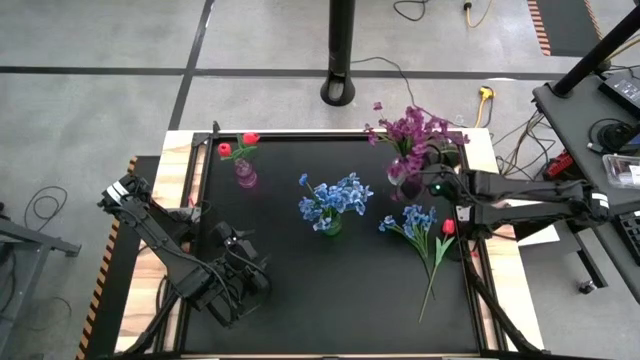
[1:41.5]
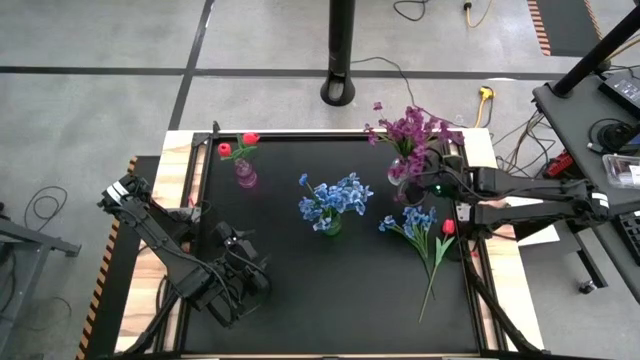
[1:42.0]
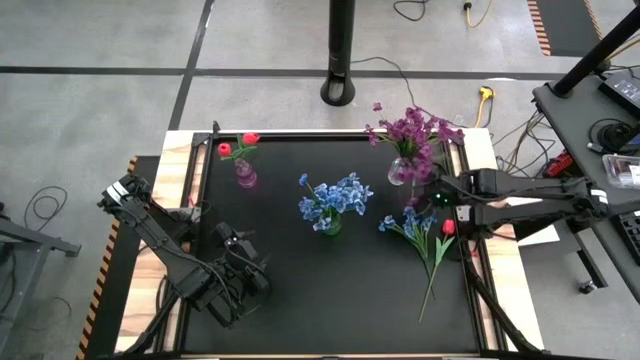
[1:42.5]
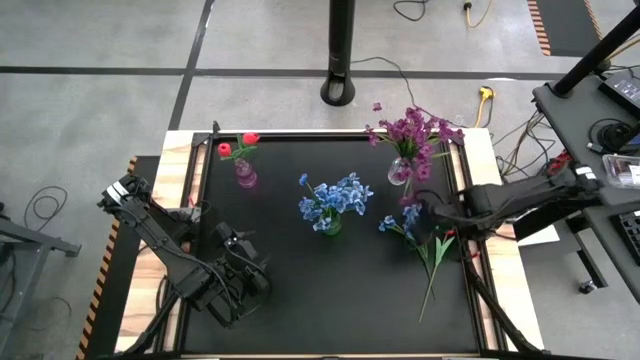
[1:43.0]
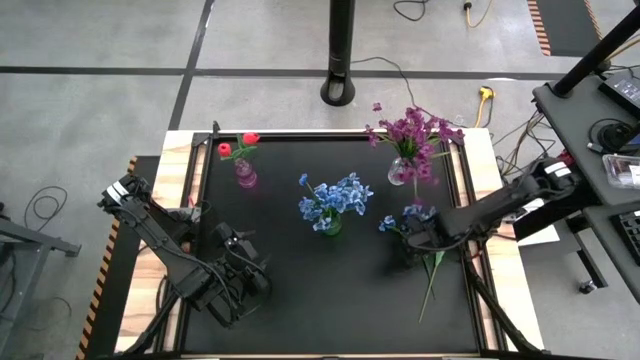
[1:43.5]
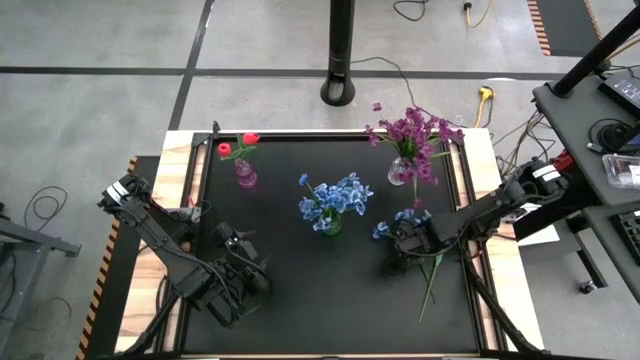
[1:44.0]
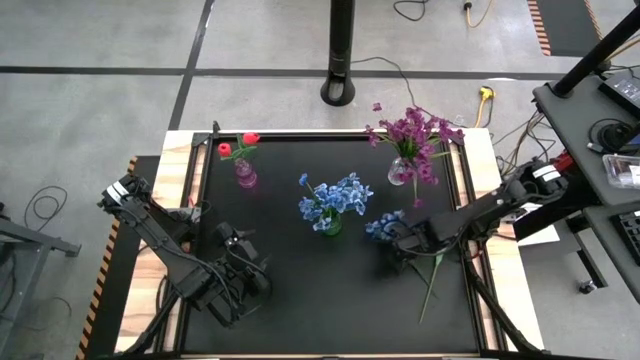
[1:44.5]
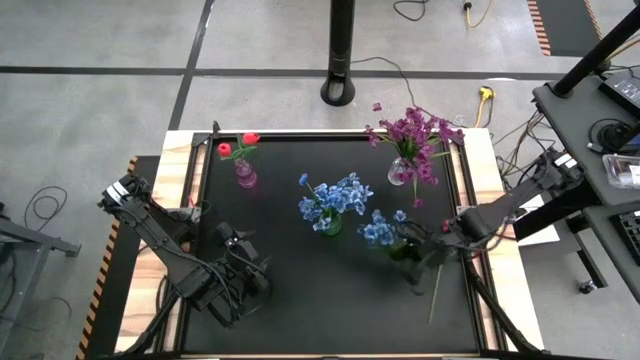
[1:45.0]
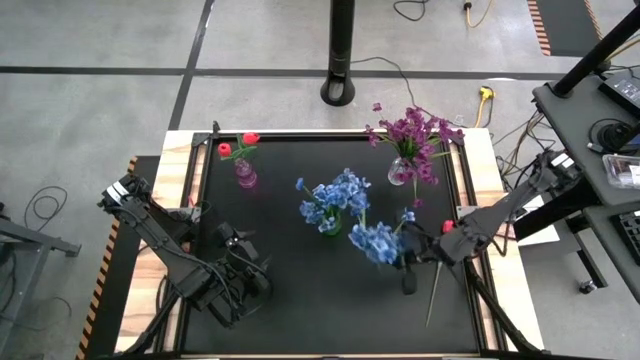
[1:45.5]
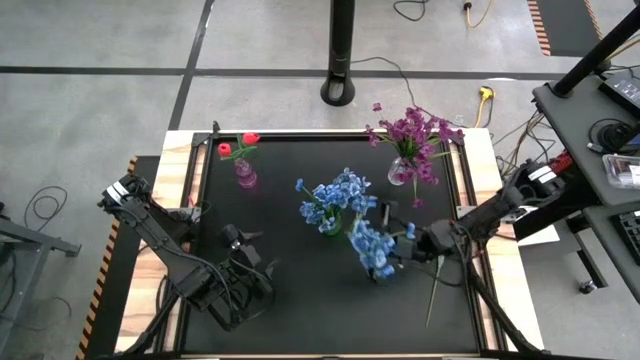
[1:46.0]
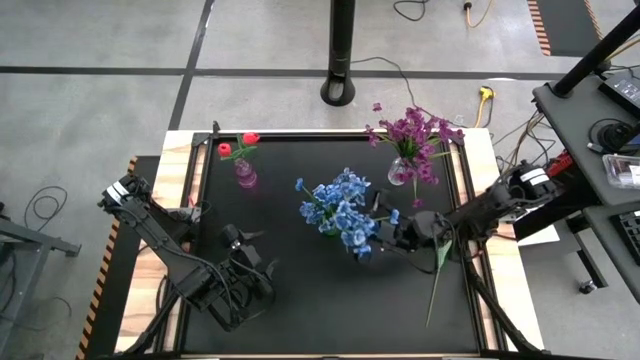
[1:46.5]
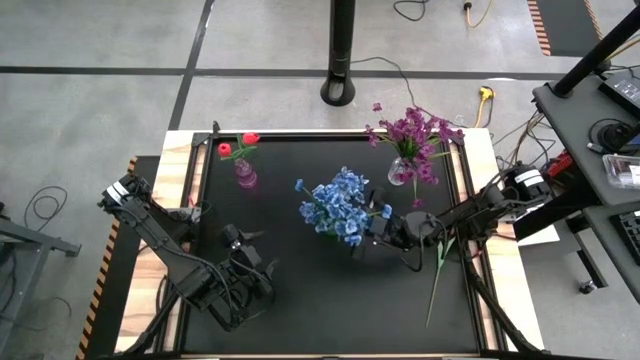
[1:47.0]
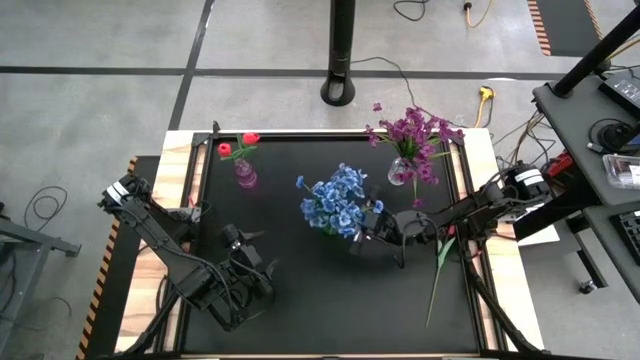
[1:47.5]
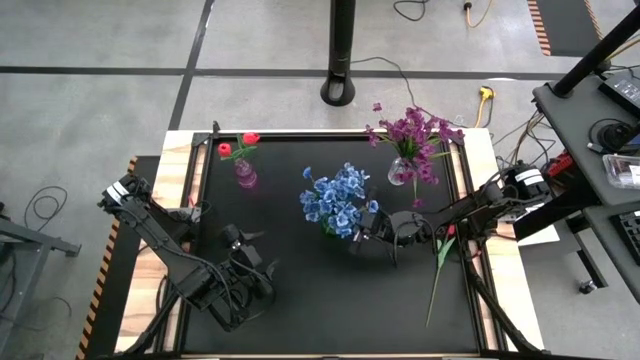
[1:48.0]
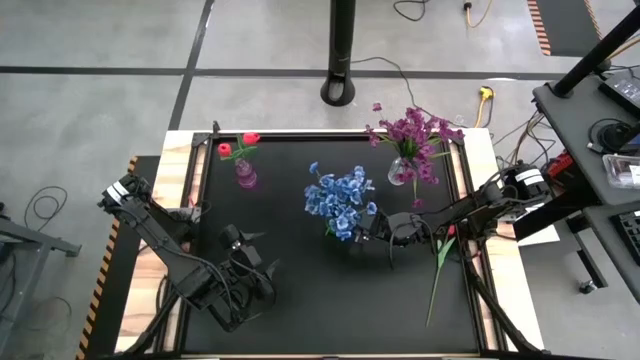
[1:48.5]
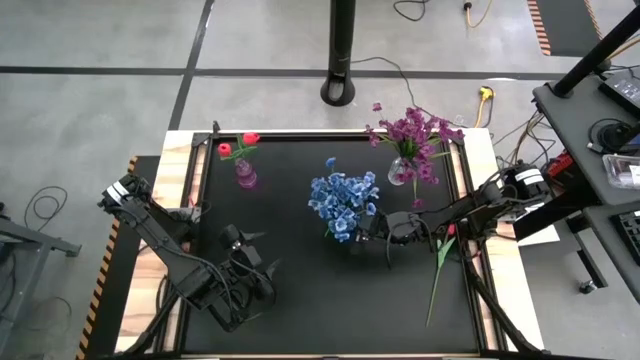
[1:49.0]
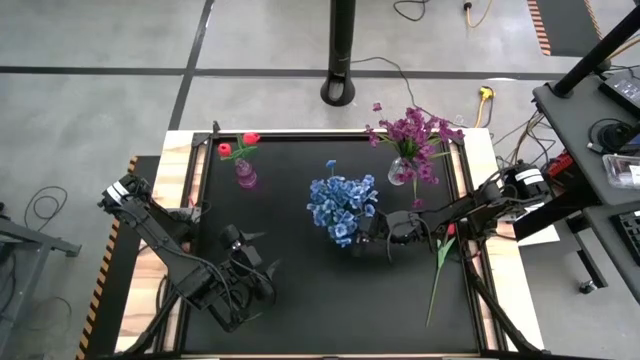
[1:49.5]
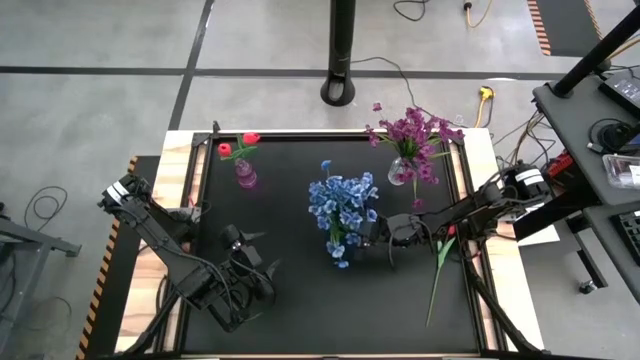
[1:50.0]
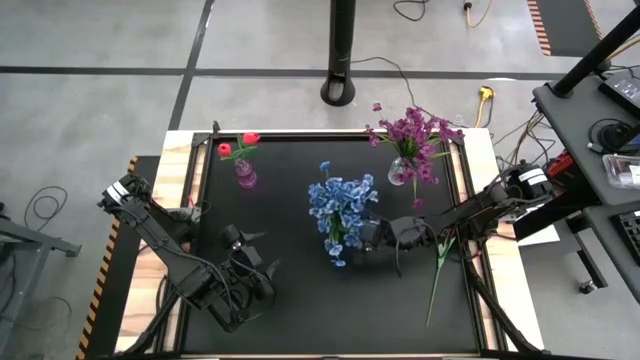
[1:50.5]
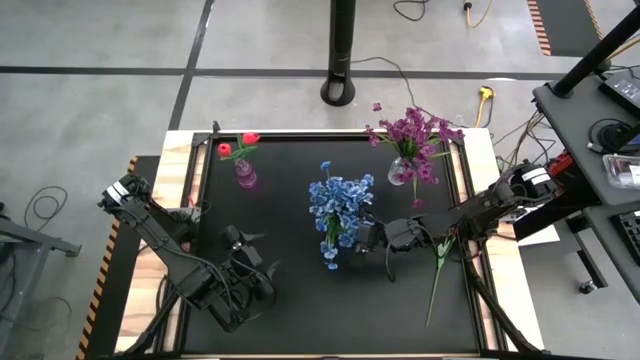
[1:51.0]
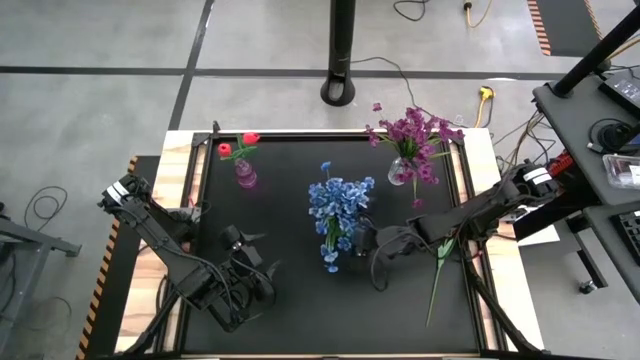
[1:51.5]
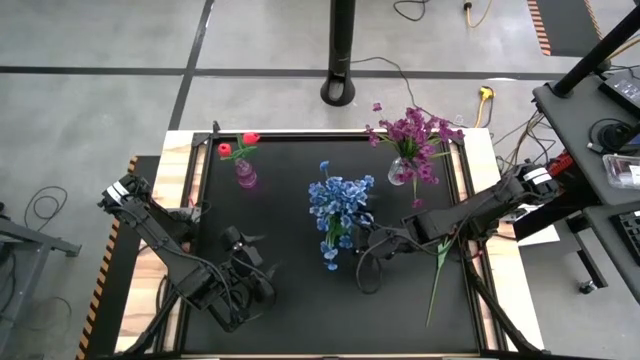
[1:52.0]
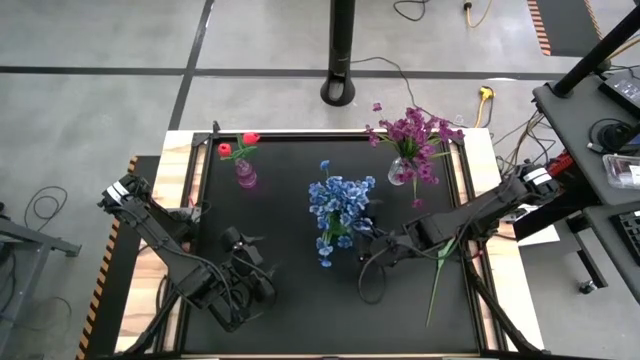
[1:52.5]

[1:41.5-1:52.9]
Task: Sort flowers into vase by color
Put the blue flowers into the green vase

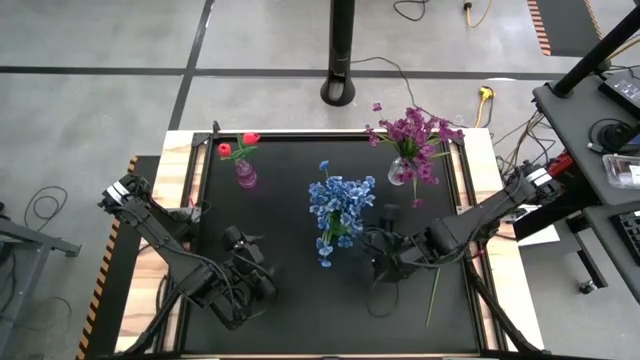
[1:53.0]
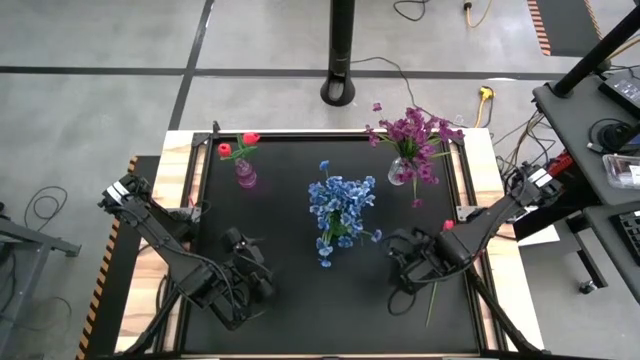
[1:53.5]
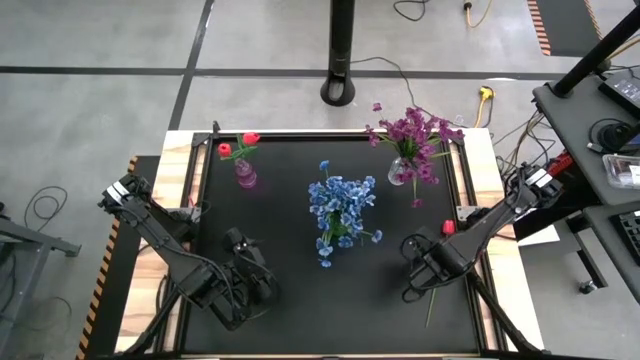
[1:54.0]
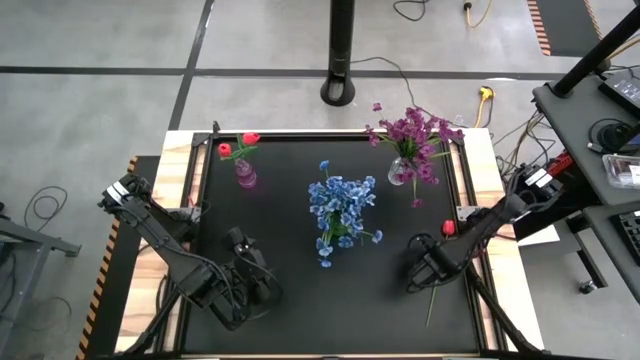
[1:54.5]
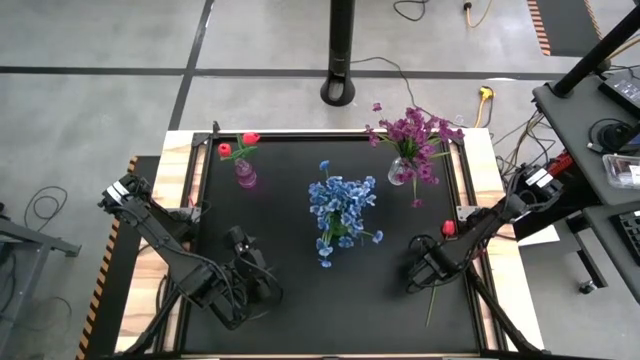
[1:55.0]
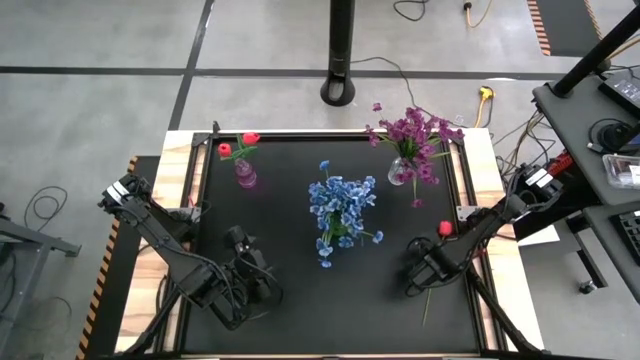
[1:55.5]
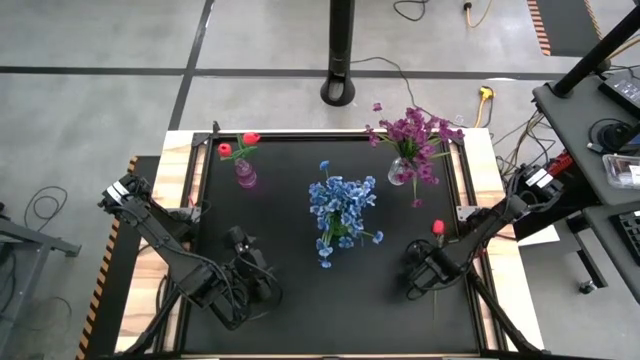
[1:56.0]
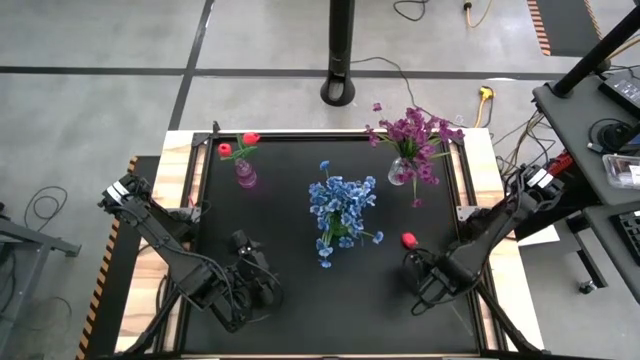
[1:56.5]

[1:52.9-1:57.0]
Put the pink tulip into the violet vase

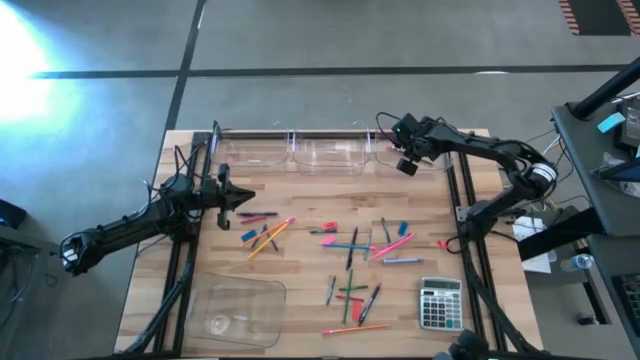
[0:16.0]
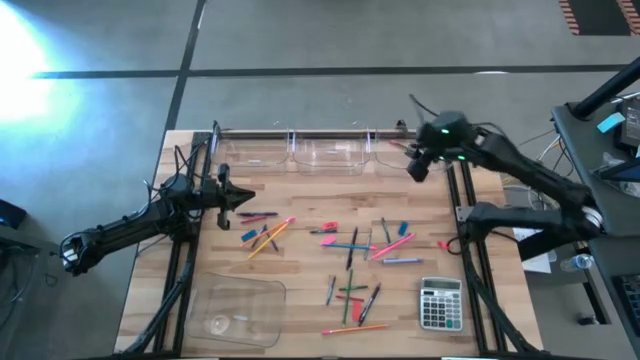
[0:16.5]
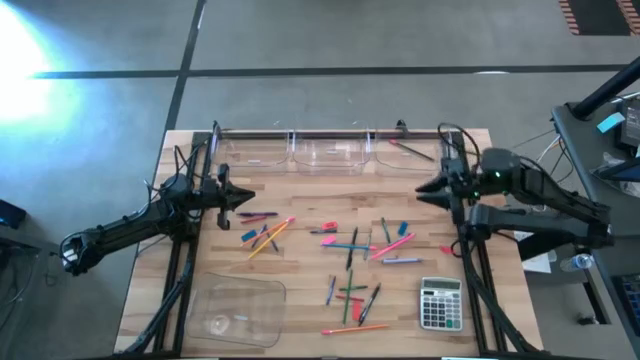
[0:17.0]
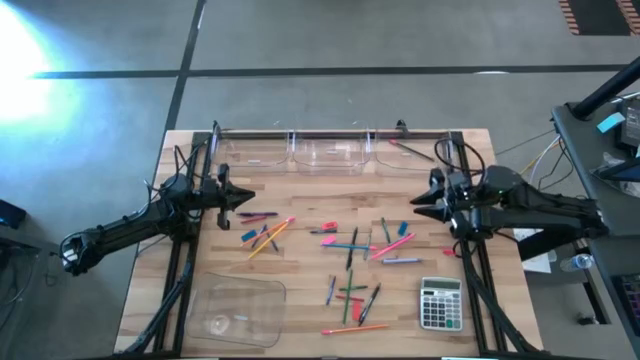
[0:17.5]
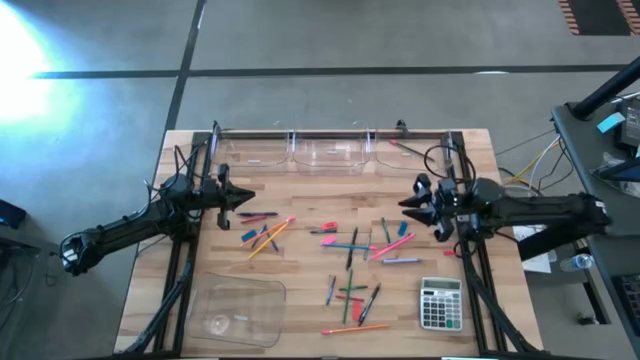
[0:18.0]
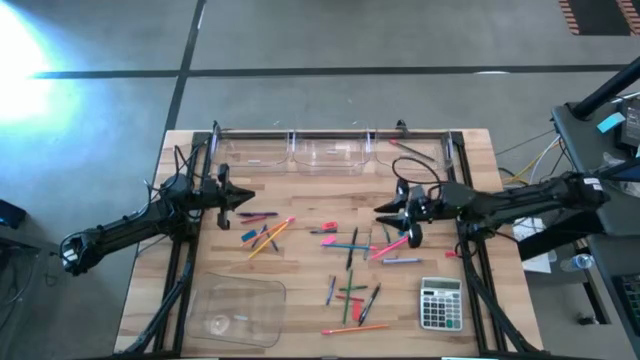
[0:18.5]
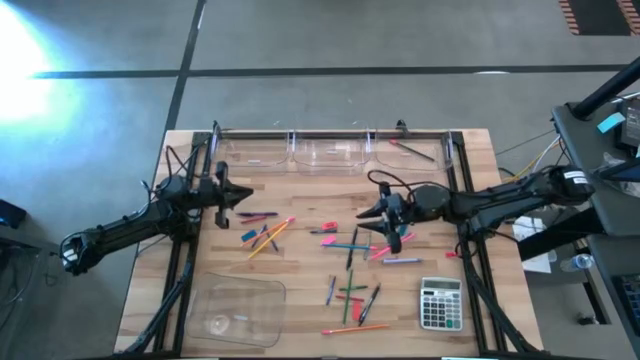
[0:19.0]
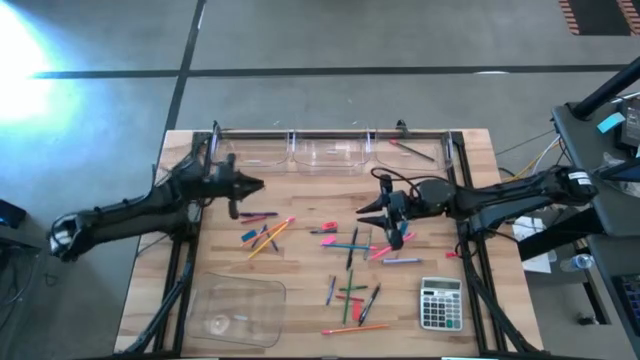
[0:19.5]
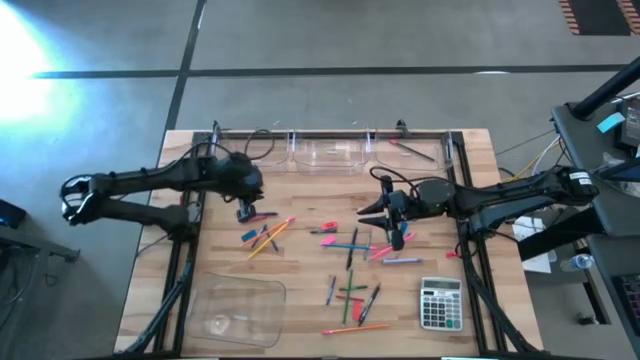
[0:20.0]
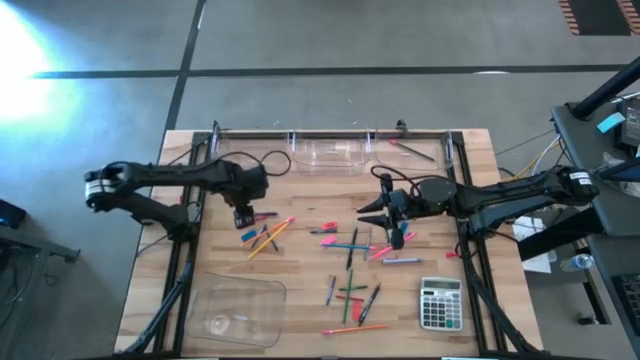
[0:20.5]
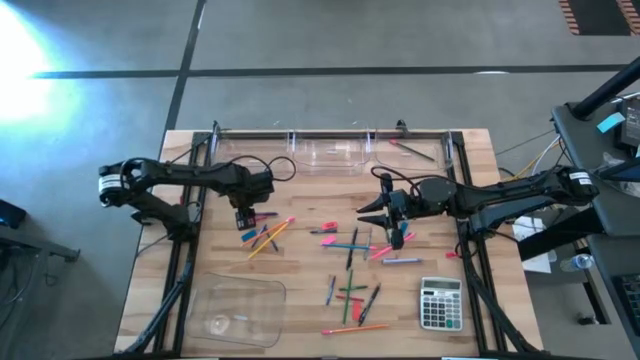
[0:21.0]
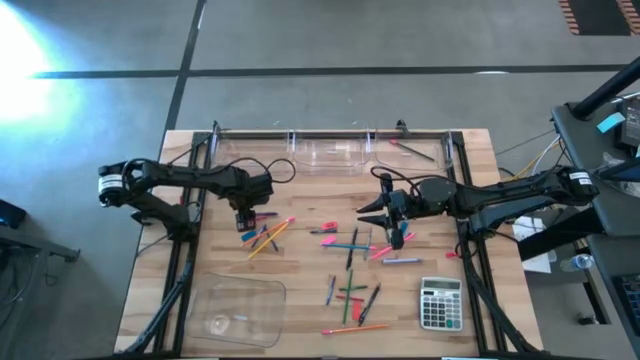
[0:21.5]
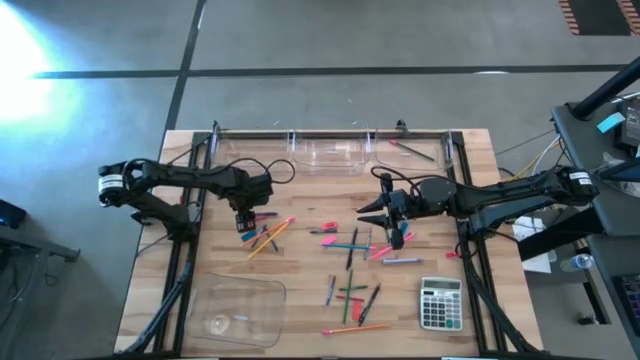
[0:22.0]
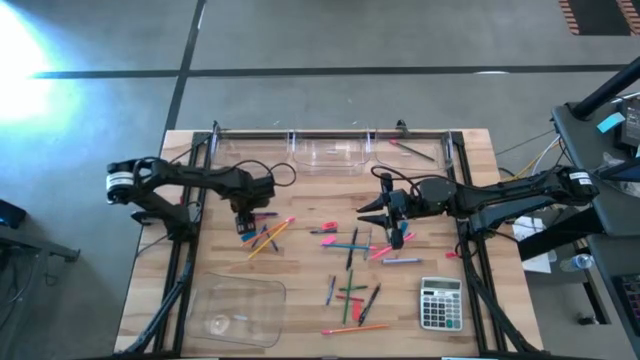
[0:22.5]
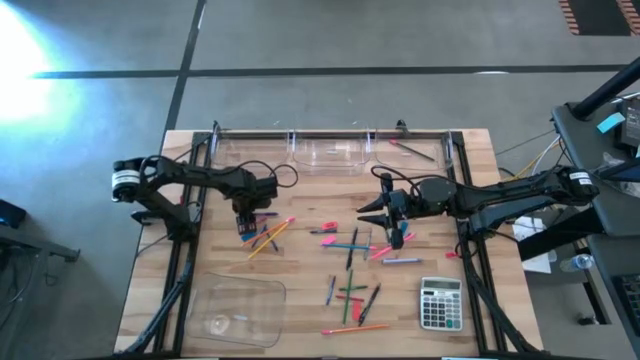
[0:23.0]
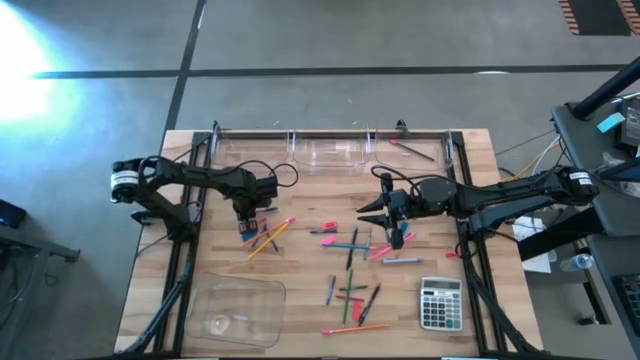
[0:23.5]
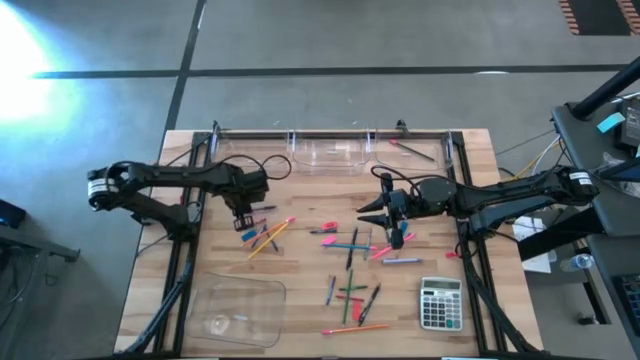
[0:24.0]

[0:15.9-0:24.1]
Task: Sort crayons/erasers/pens/pencils in bins
Put the blue pen into the top left transparent bin
